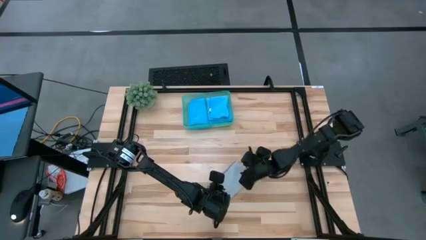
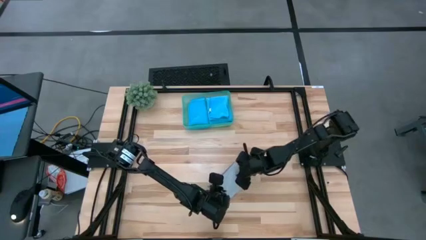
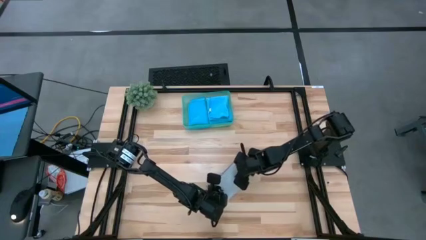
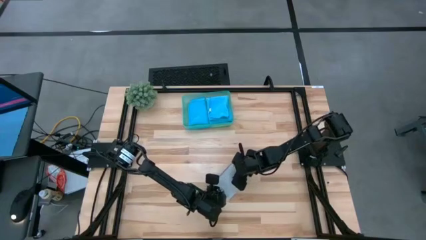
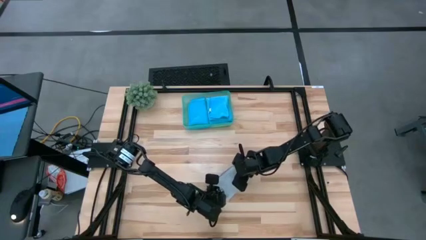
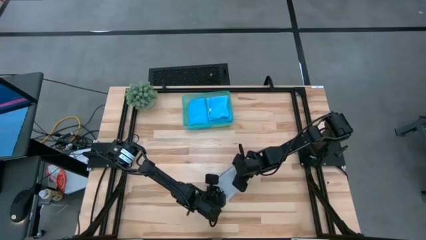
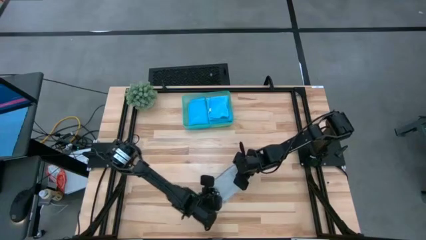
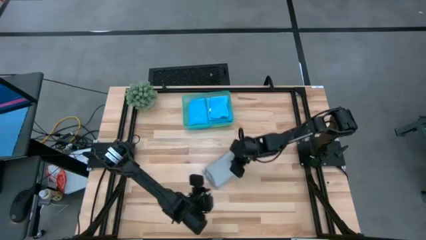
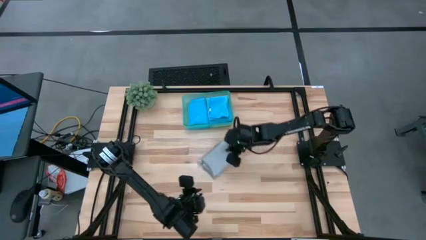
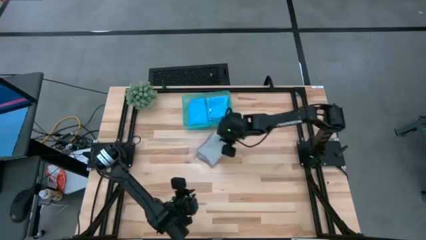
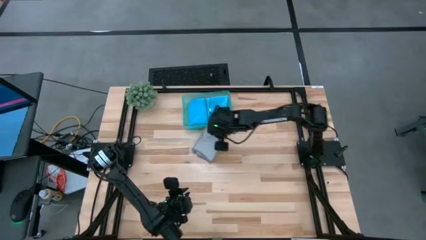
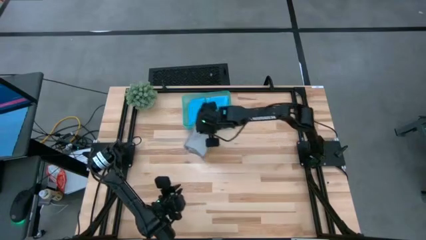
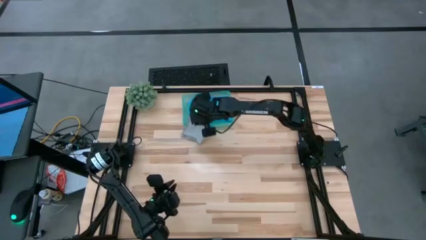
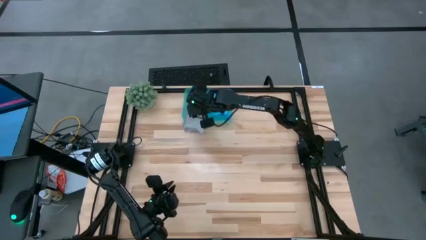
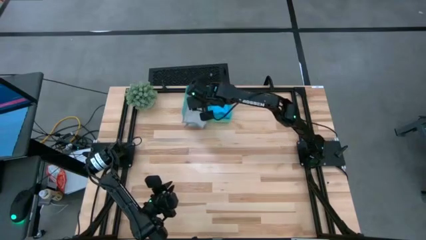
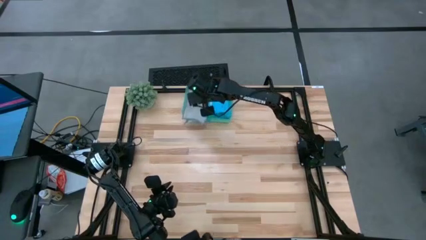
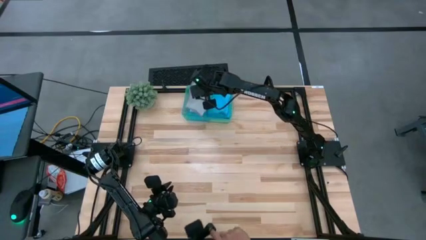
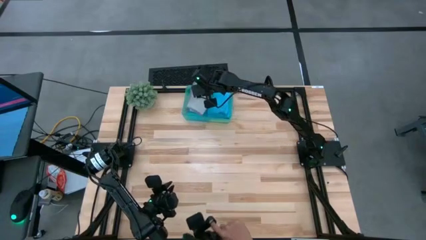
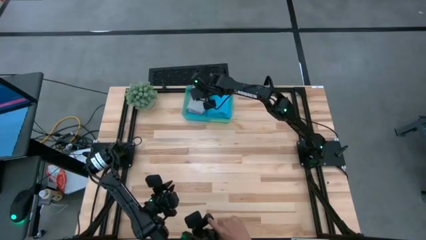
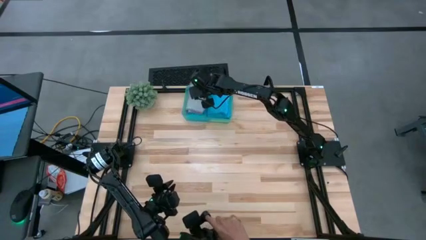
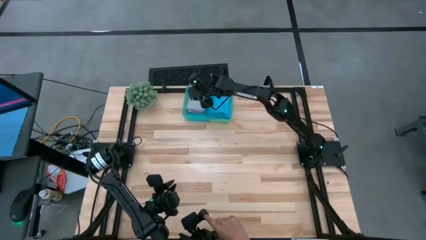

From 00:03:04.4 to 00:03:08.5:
Task: Fold microfiber towels
Put the gray microfiber towel into the bin

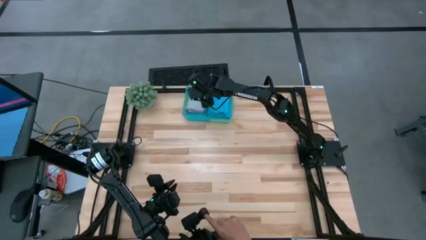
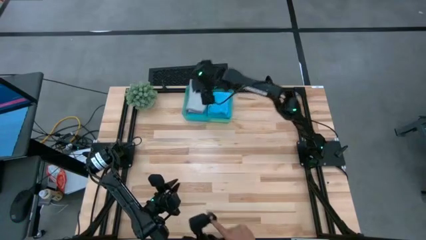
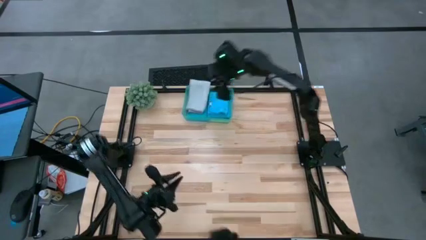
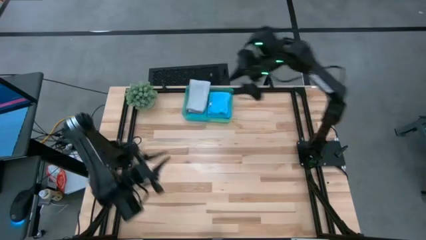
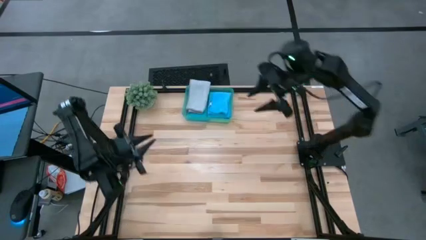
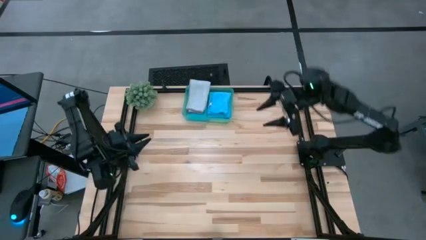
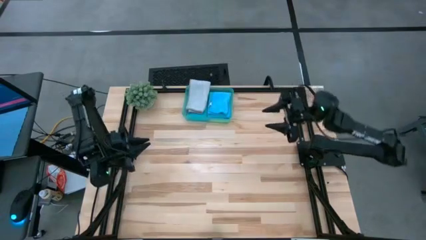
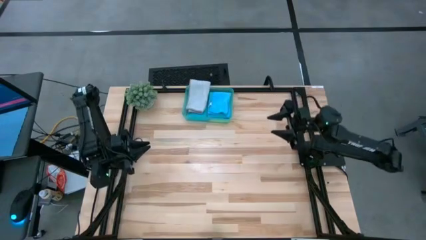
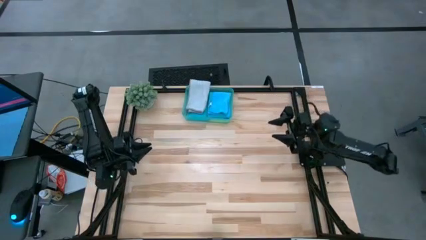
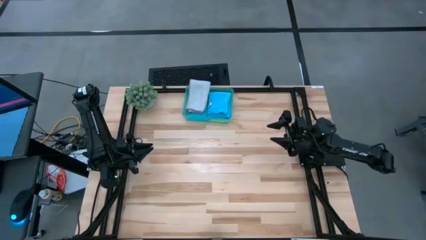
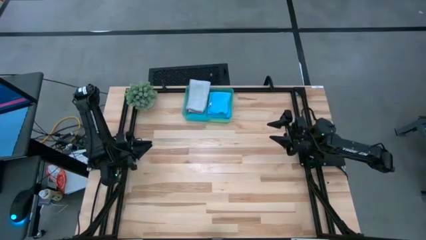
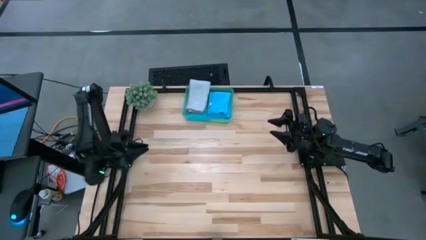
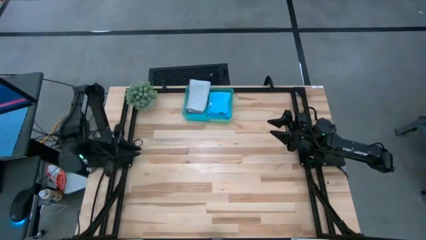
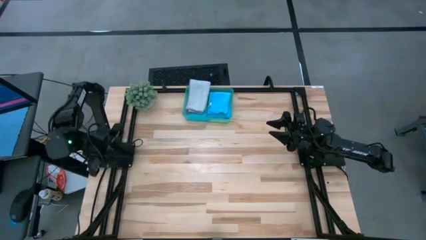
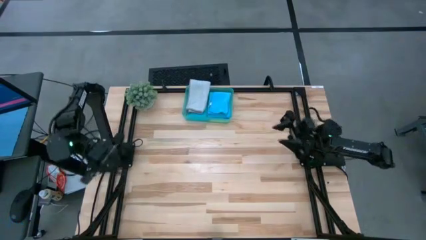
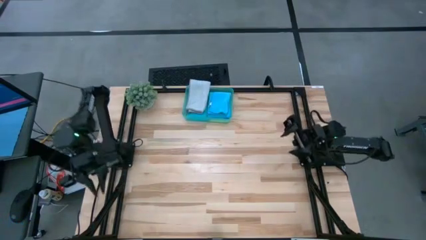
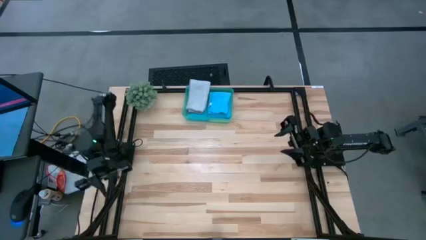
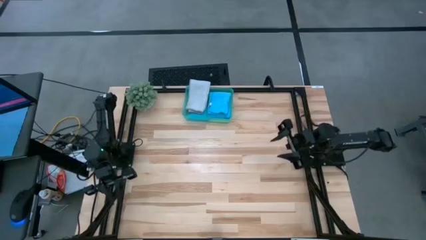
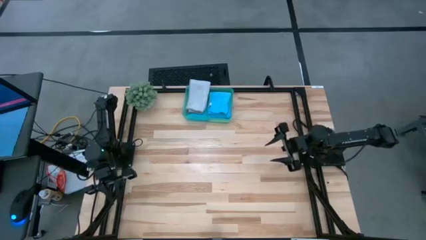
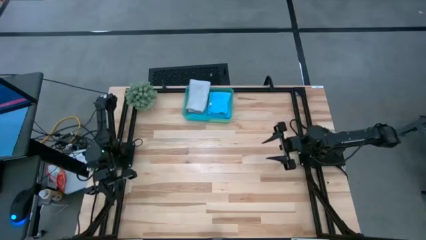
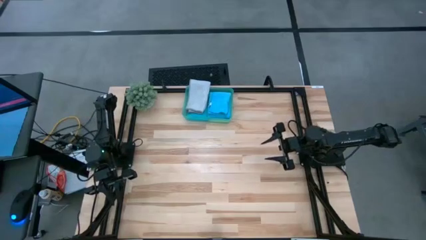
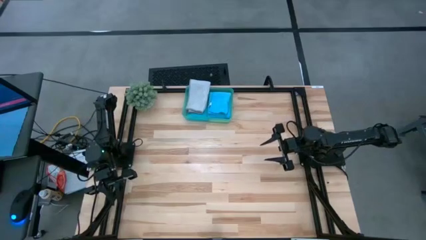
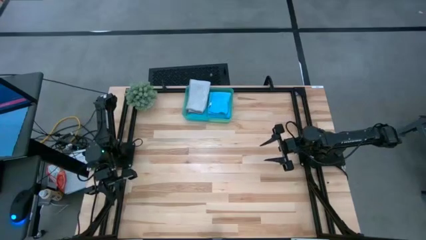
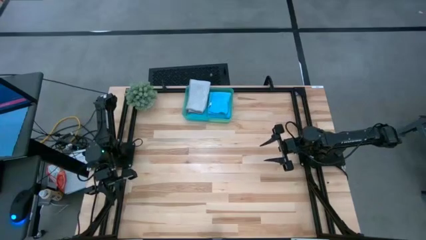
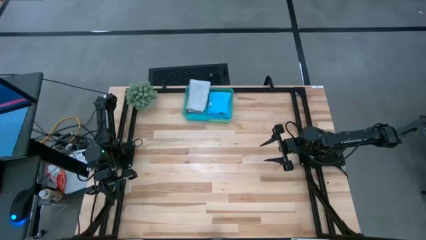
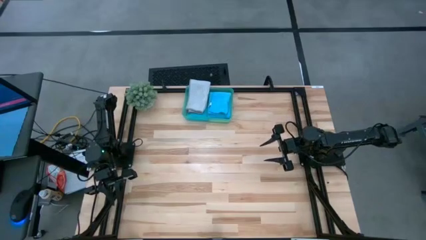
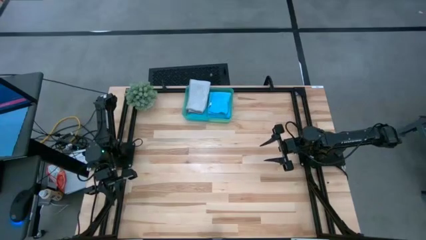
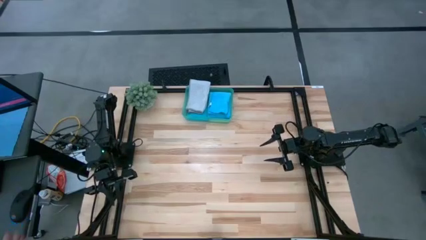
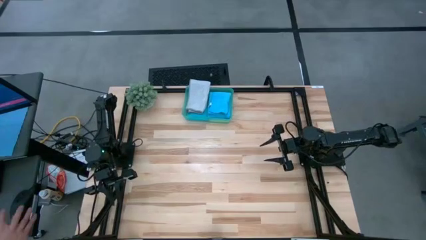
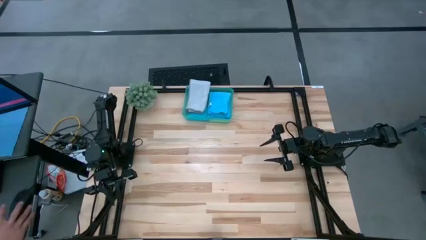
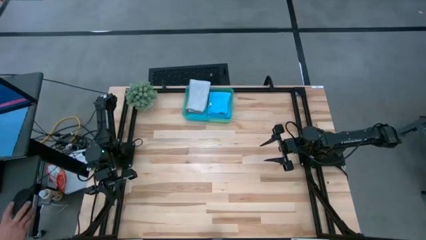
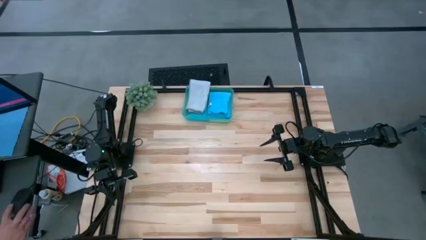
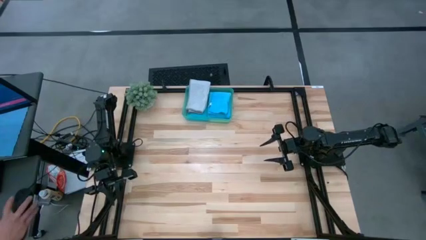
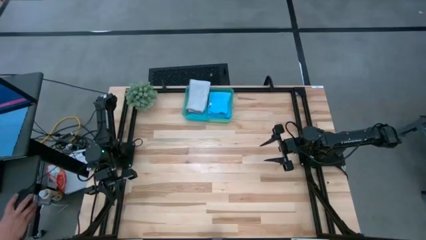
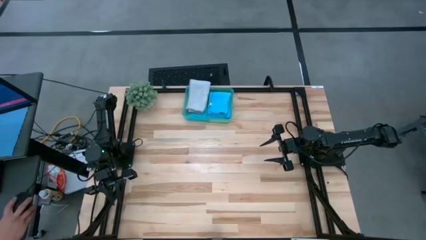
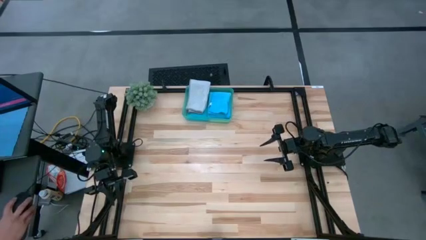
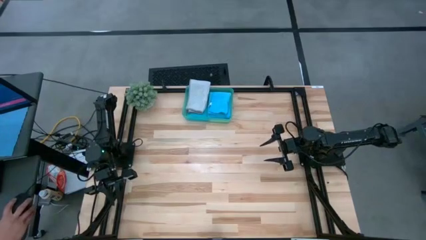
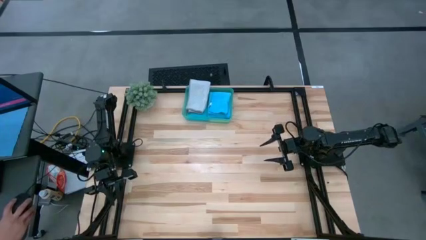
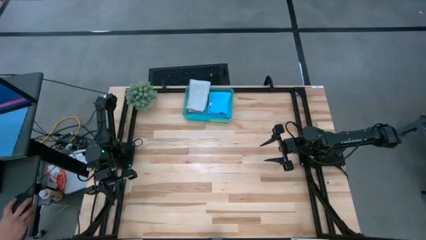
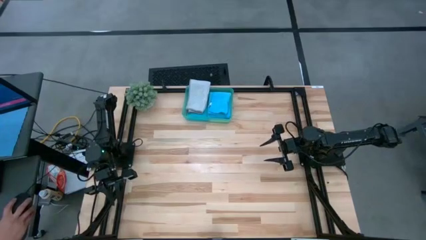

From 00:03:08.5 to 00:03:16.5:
Return to Home Position

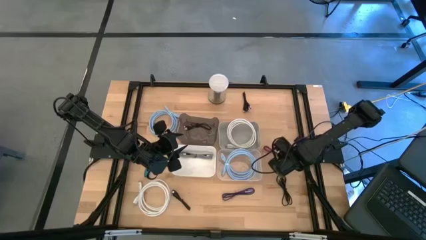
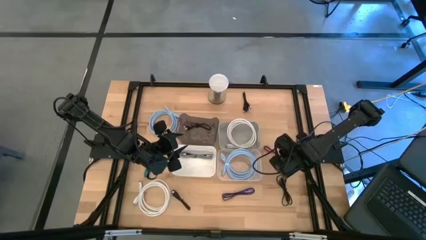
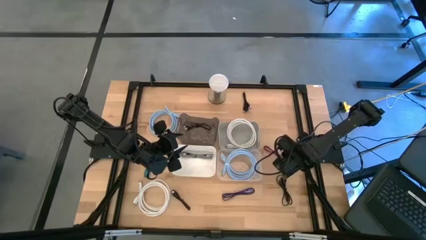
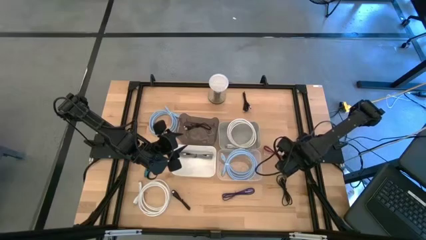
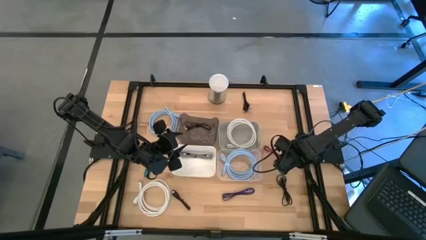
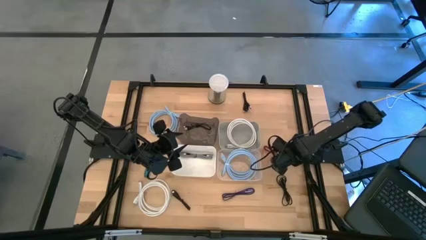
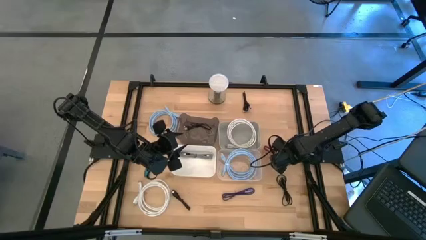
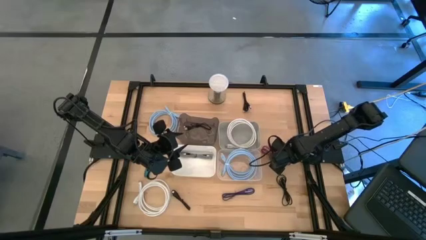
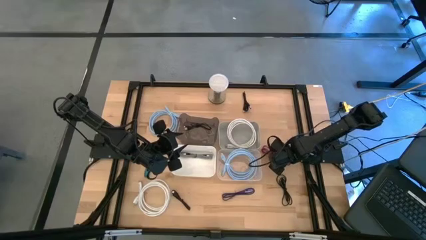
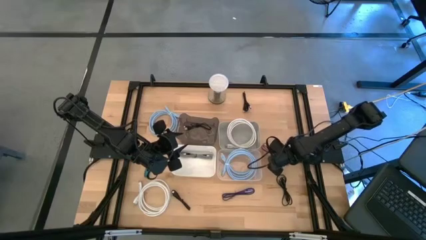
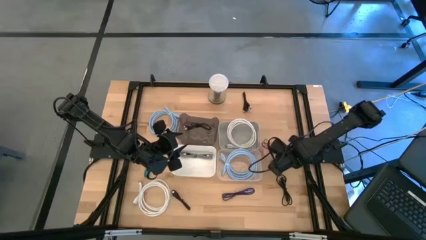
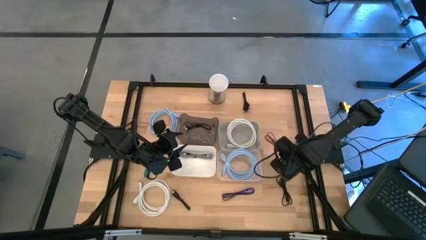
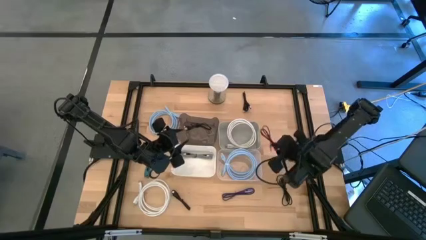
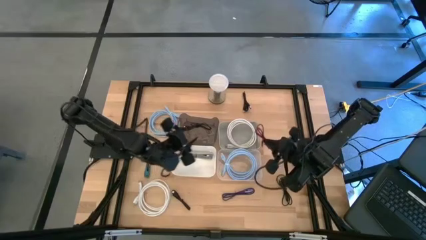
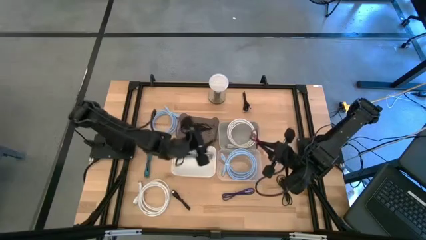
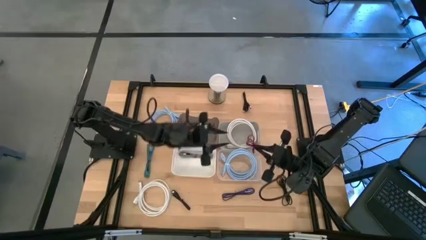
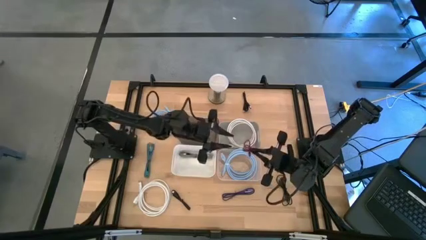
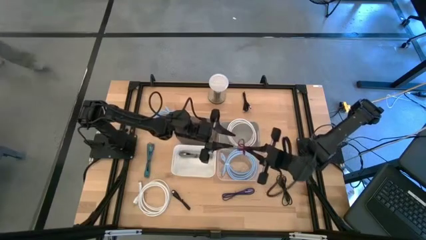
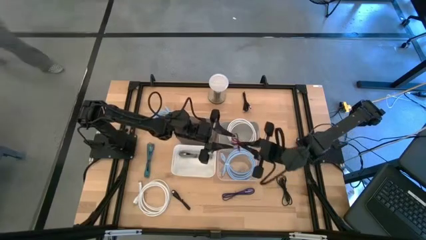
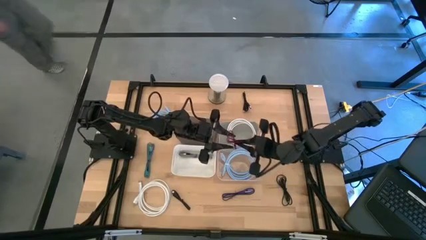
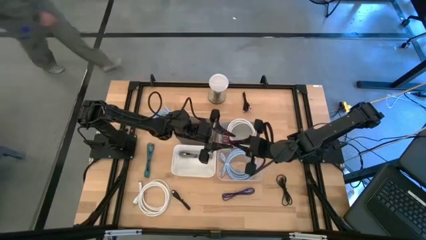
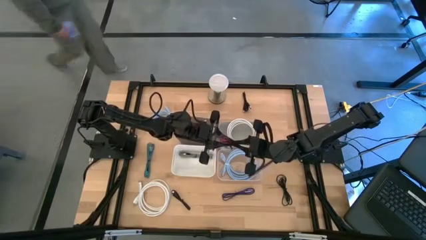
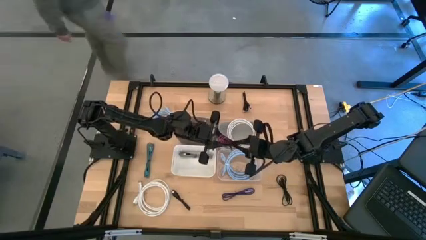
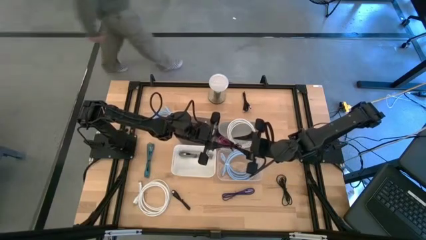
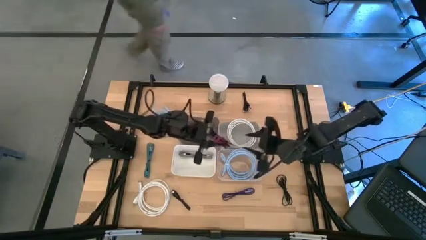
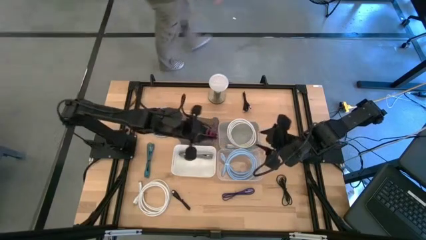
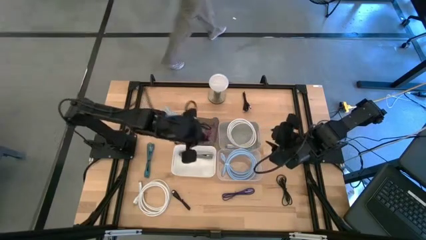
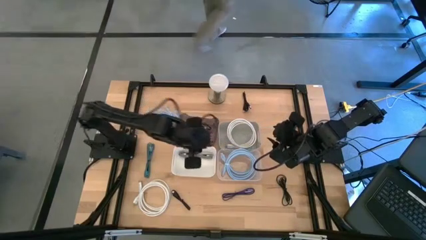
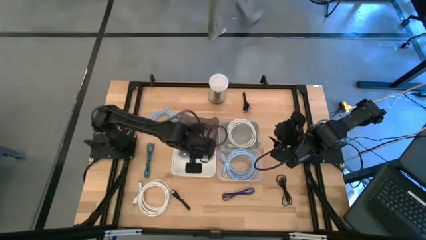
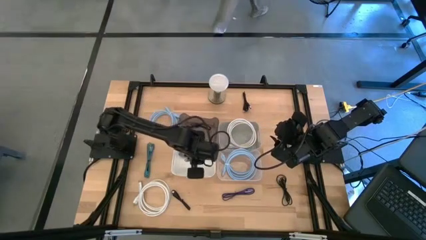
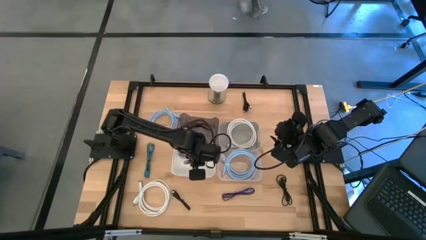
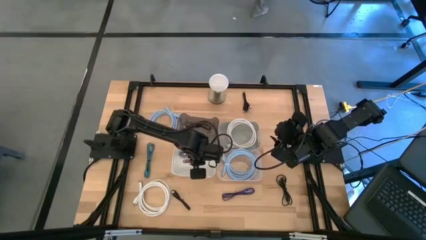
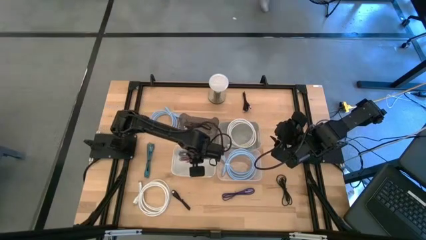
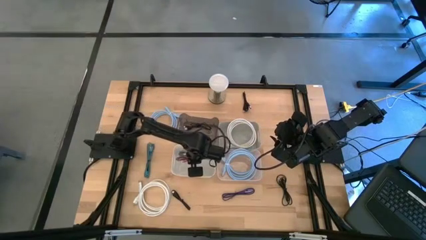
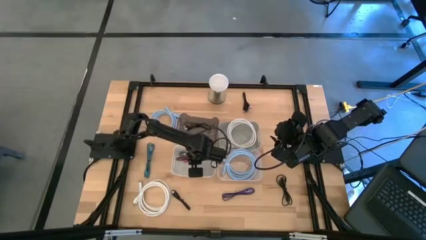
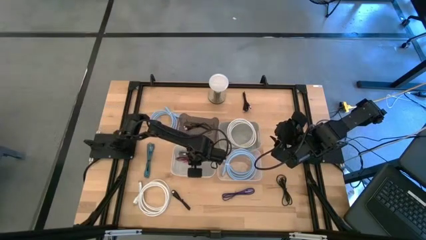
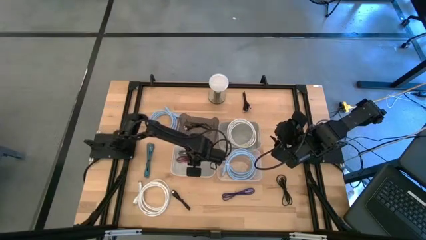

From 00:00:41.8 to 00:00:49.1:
Task: Pick & Place USB Port
Put the red patterned charger cable into the white bin
